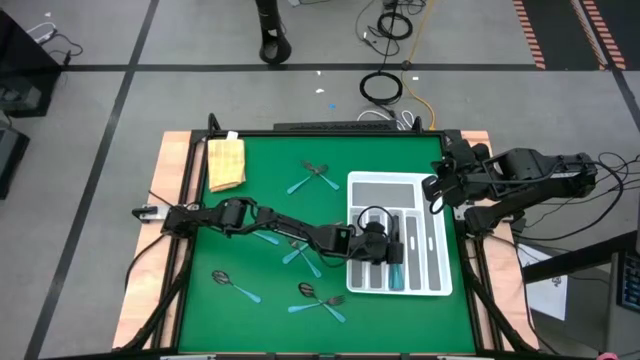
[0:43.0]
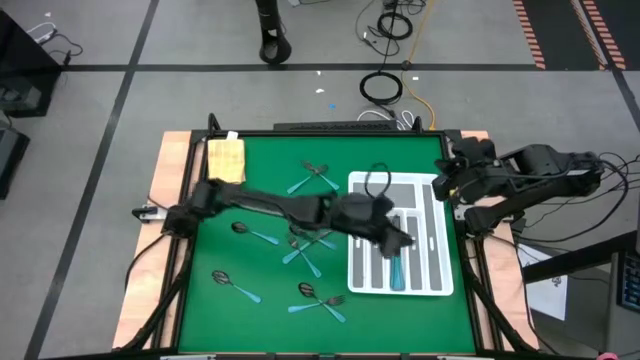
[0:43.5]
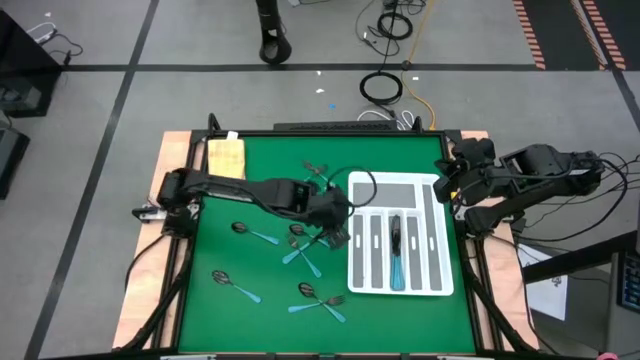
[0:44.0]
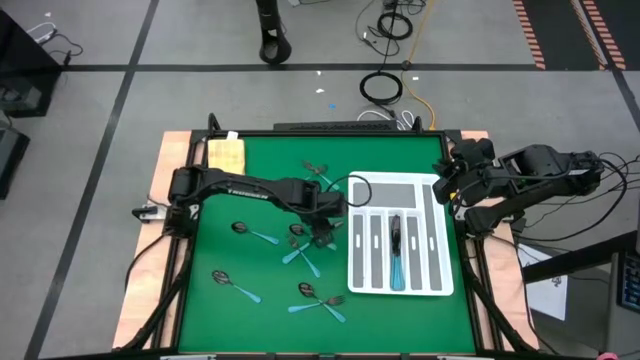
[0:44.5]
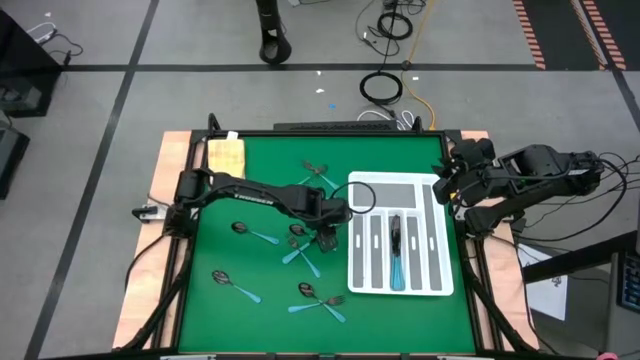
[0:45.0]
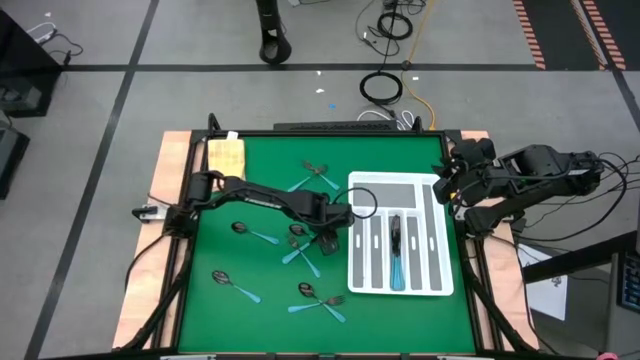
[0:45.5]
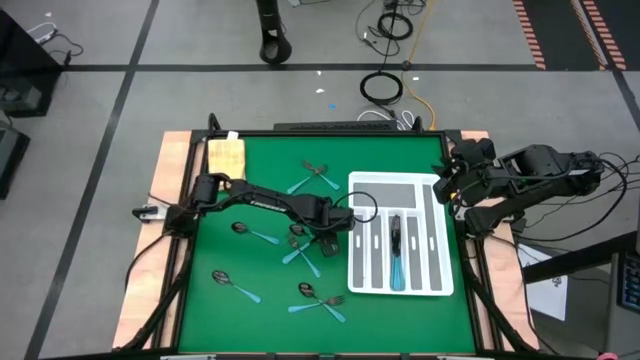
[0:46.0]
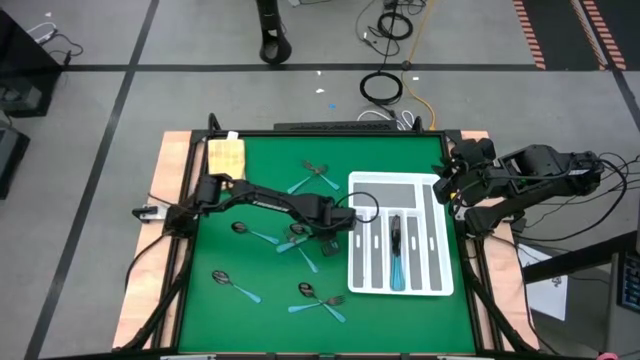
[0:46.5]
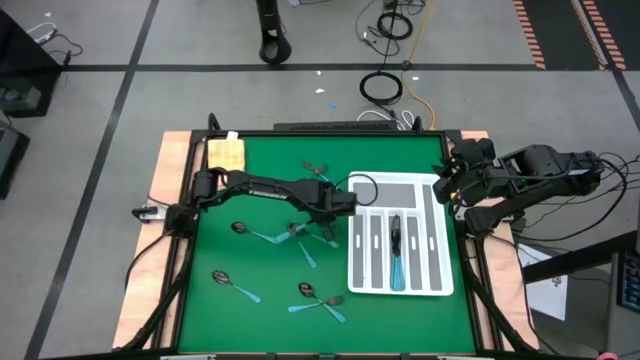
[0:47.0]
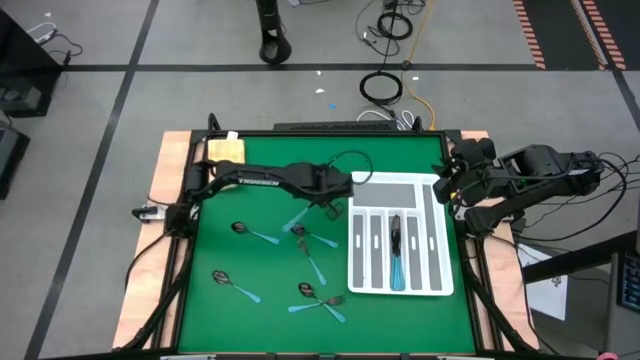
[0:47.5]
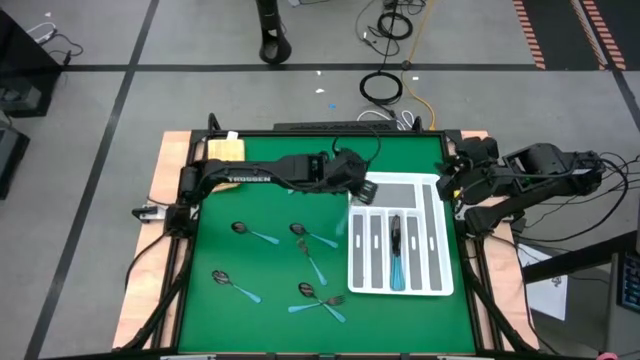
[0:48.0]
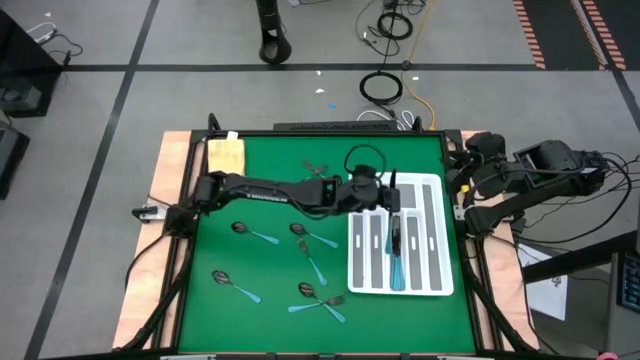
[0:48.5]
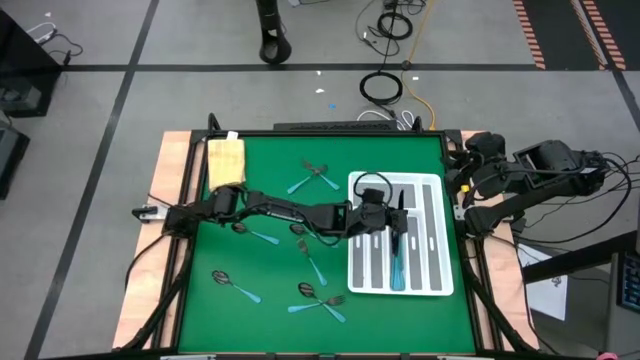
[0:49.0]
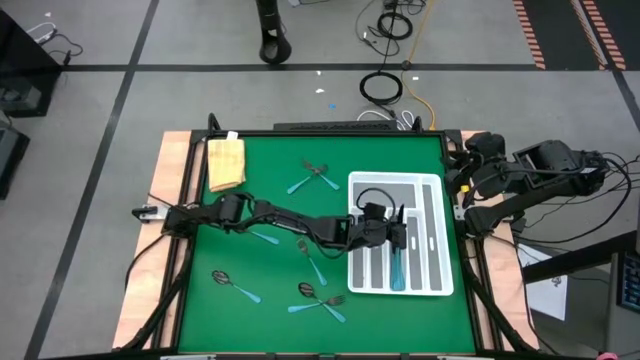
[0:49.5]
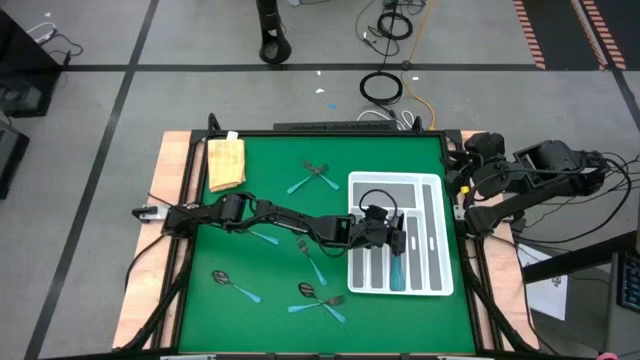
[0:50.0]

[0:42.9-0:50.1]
Task: Sort silverware
Put the blue knife into the tray

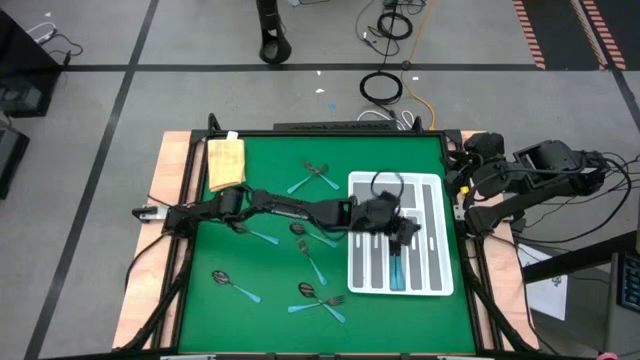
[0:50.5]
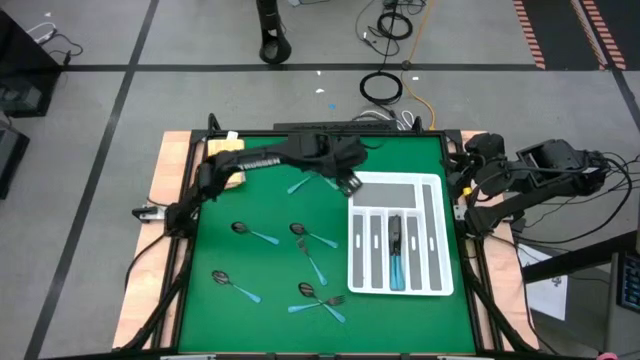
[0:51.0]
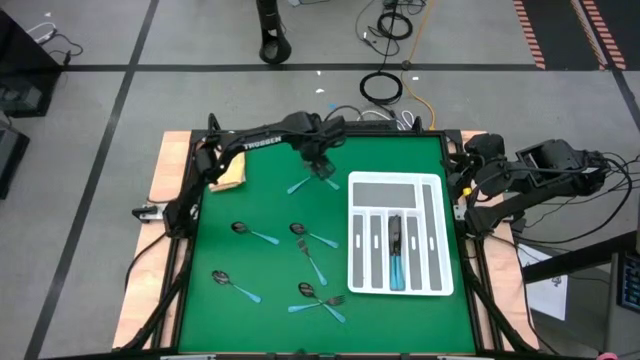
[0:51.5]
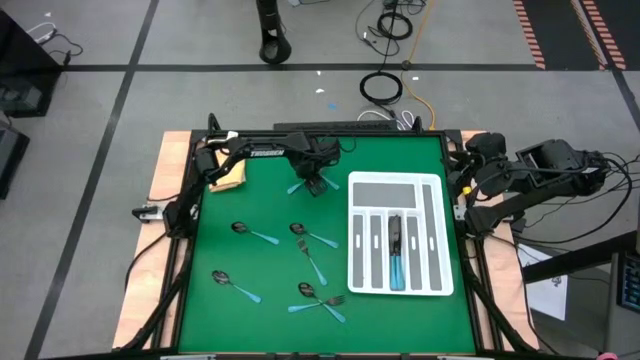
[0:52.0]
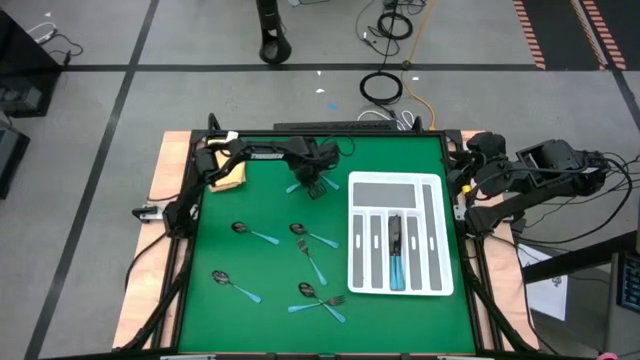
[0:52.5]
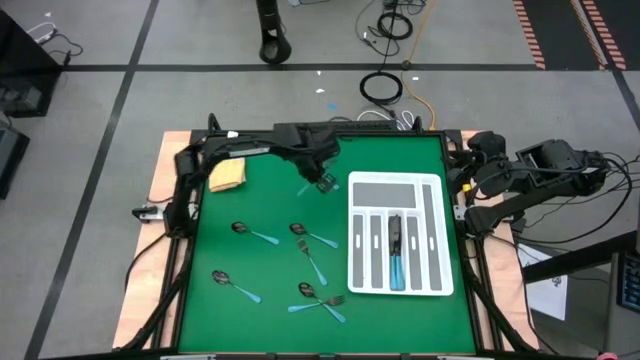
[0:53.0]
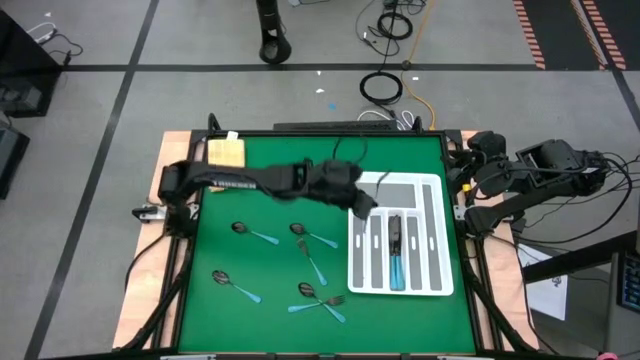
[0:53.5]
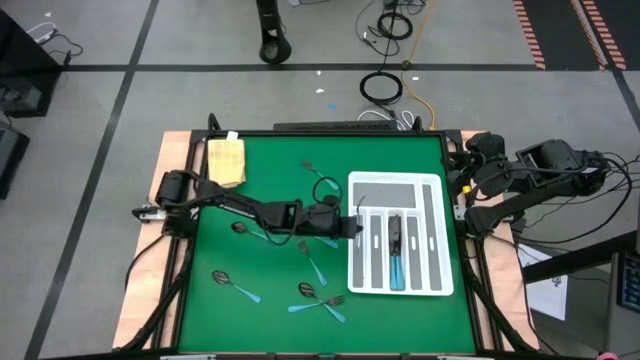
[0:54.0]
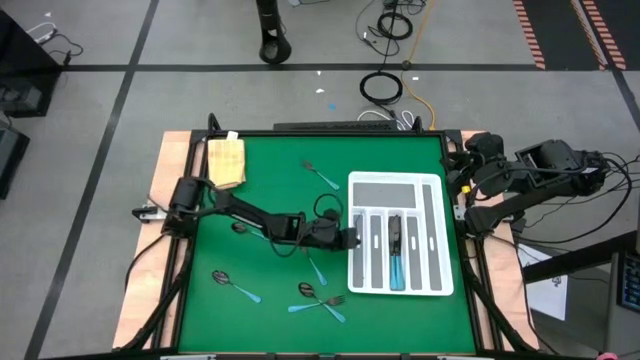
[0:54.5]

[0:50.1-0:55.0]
Put the top blue fork into the tray

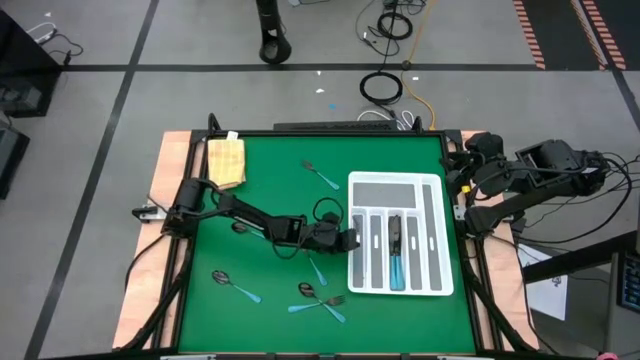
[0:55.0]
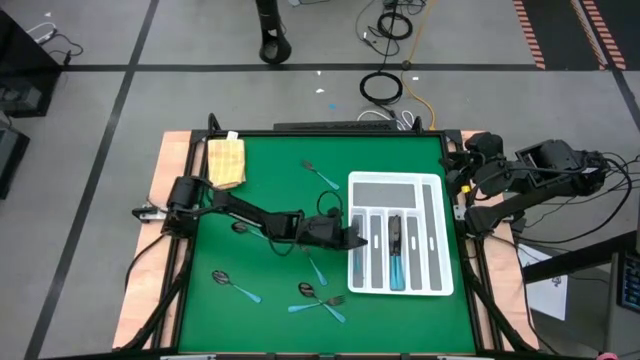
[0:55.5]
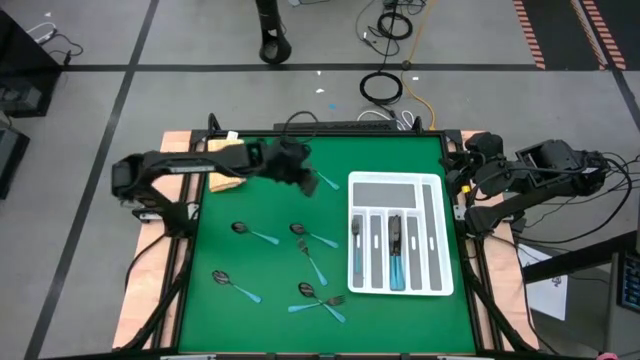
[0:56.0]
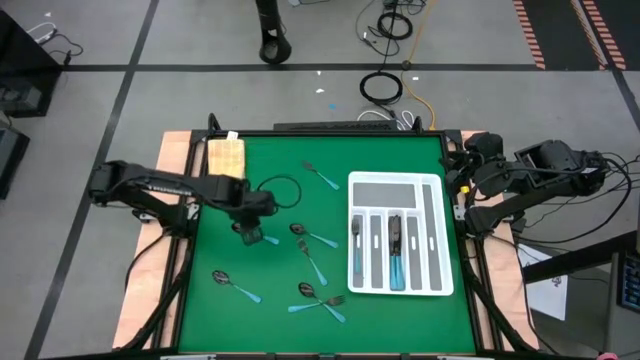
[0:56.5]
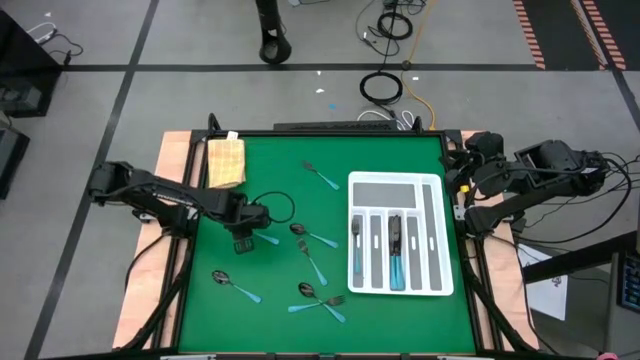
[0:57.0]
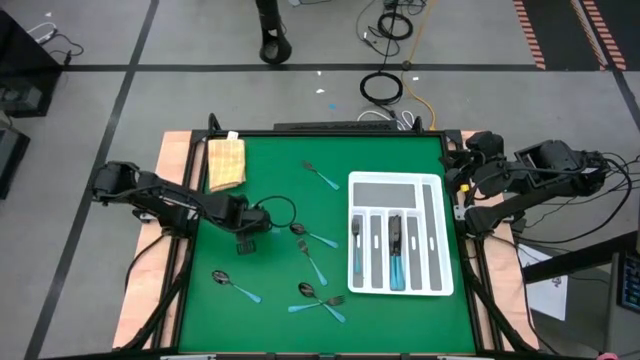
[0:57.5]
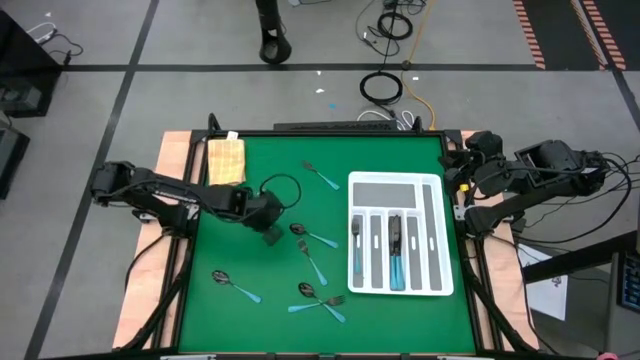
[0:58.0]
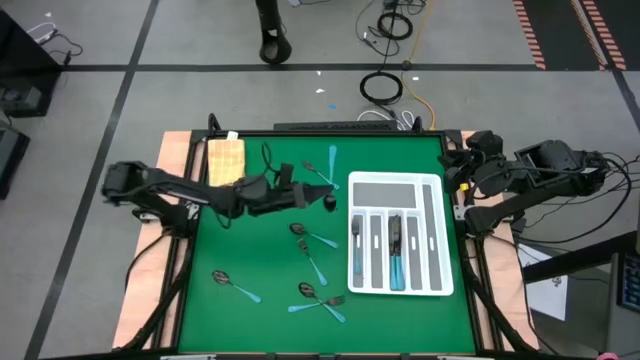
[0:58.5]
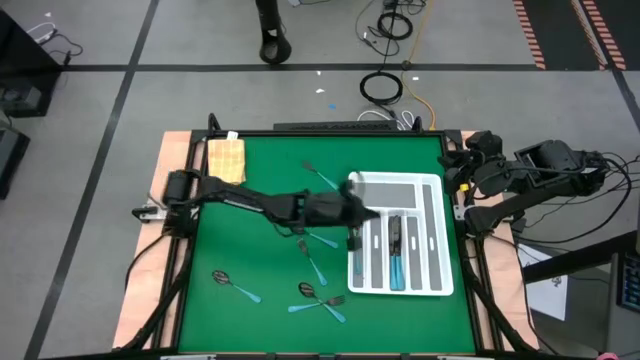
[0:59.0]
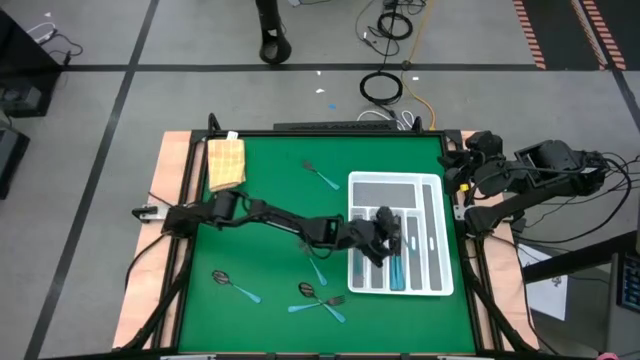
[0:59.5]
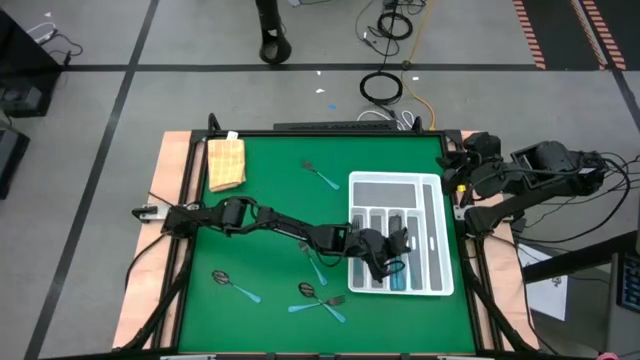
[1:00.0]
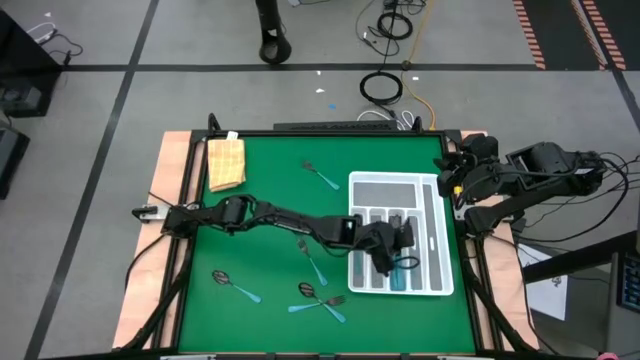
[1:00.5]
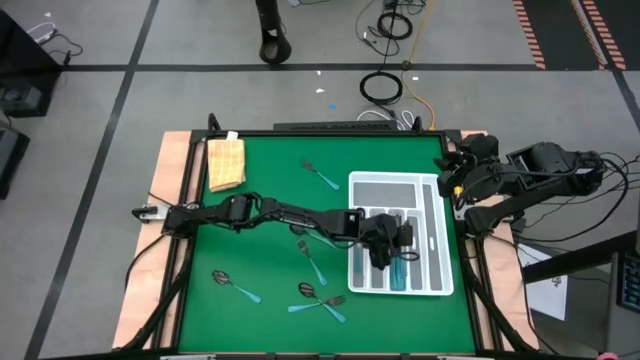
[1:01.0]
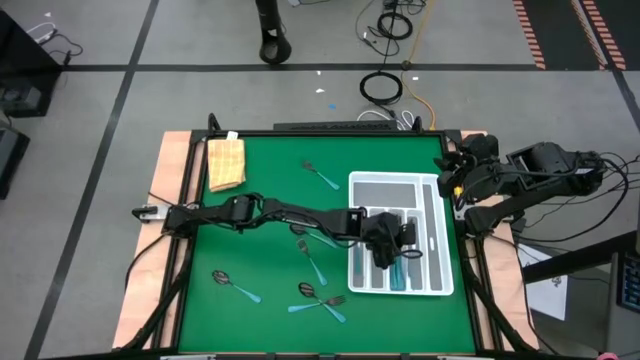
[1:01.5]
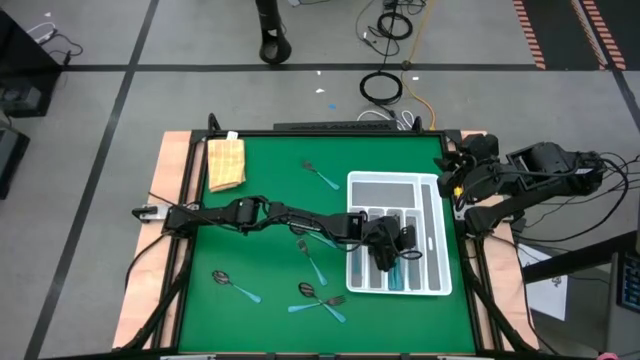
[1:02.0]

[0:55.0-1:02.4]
Put the top left blue spoon into the tray

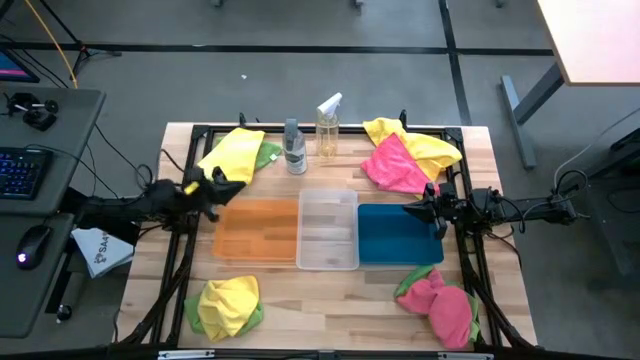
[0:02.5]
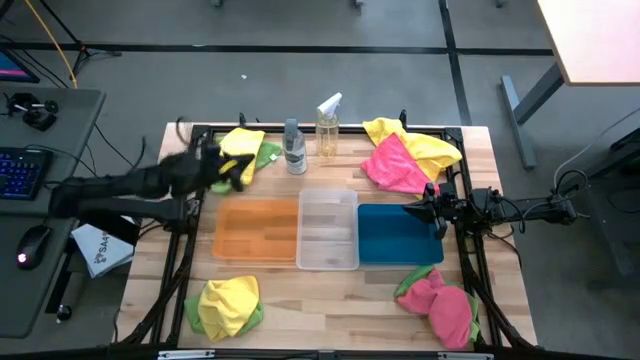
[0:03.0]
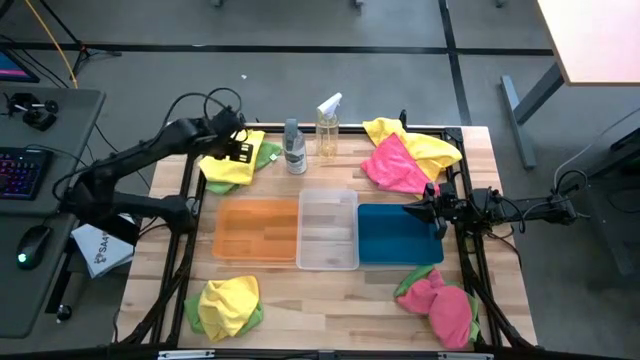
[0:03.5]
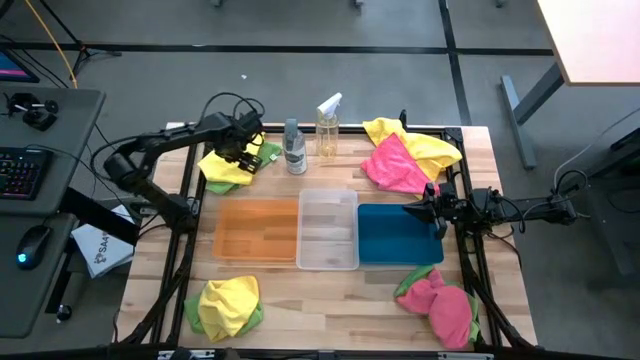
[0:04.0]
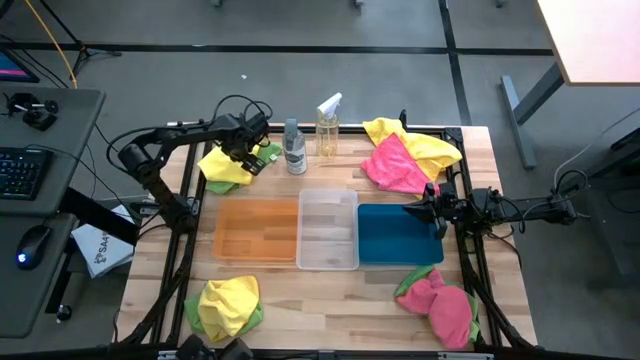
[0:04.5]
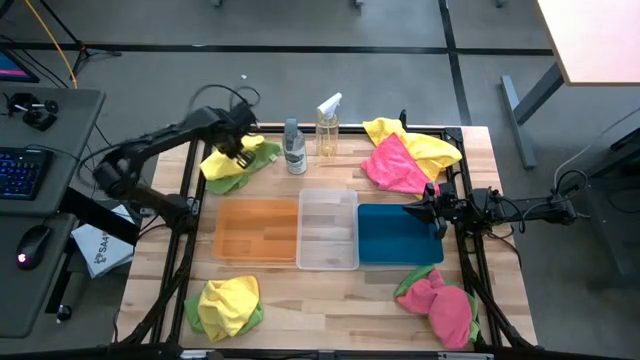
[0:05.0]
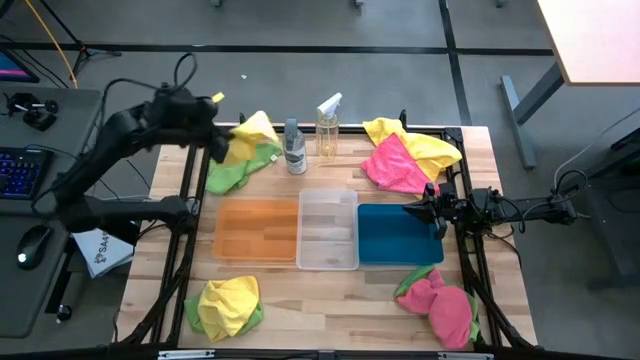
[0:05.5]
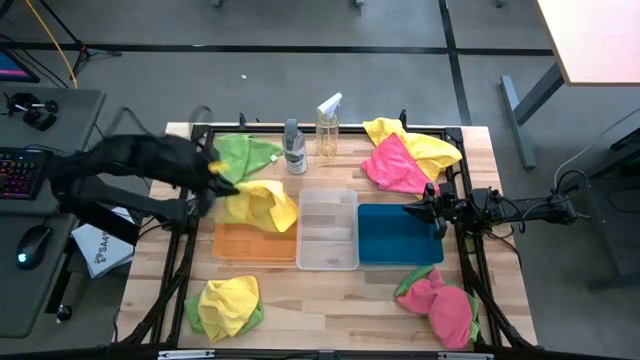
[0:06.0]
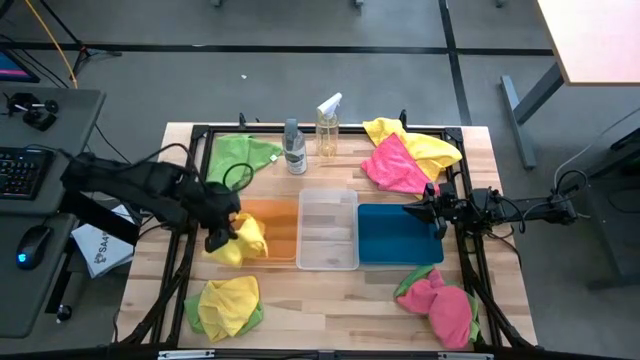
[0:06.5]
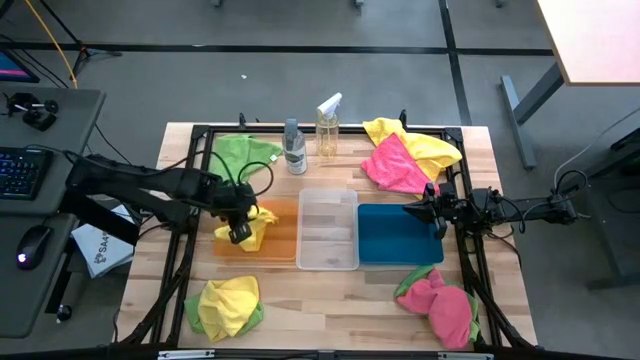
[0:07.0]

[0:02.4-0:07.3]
Task: Sort microfiber towel by color & place in baskets
Put the top left yellow microfiber cloth into the orange bin
